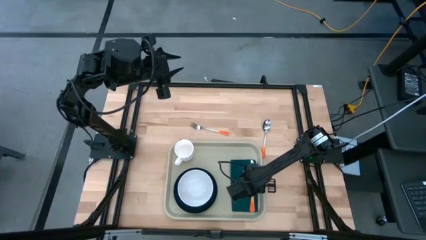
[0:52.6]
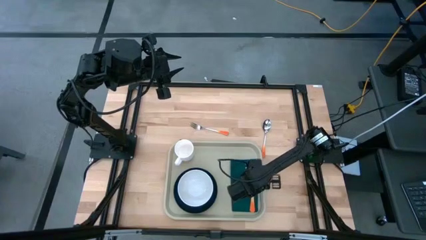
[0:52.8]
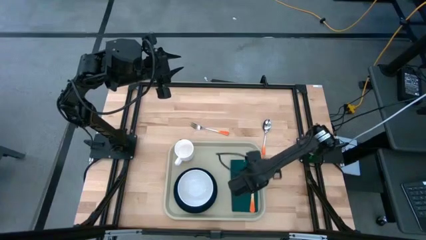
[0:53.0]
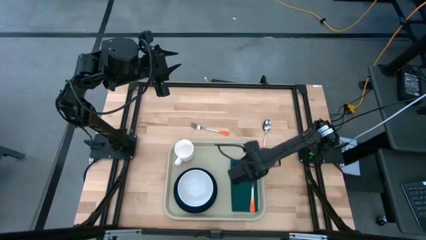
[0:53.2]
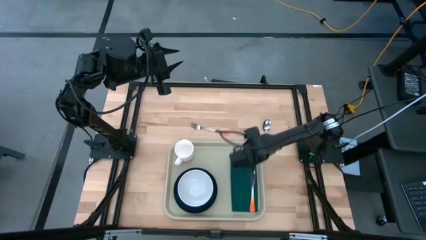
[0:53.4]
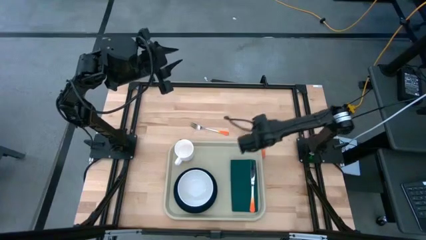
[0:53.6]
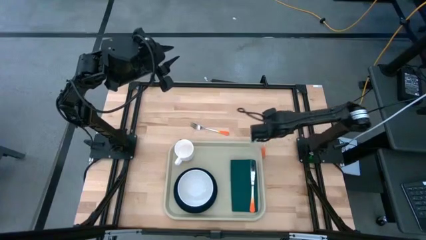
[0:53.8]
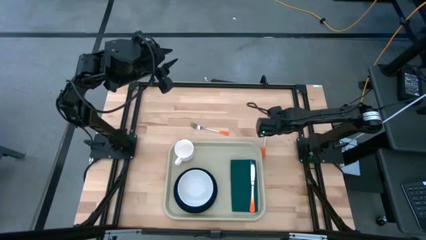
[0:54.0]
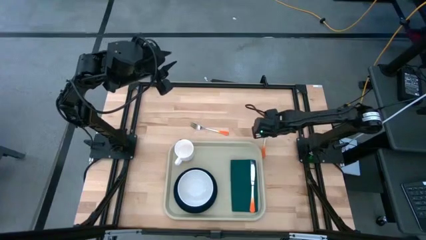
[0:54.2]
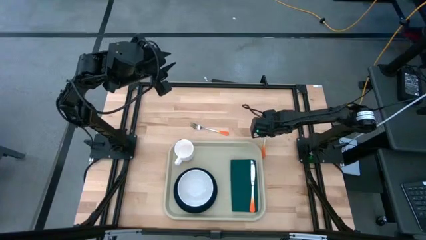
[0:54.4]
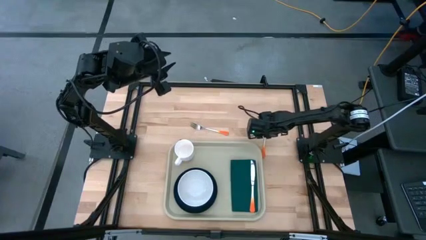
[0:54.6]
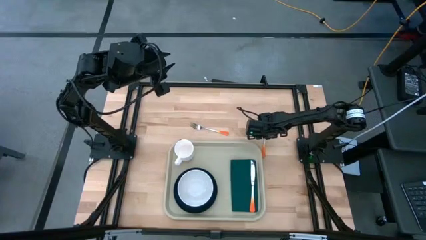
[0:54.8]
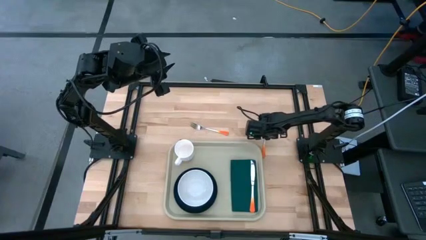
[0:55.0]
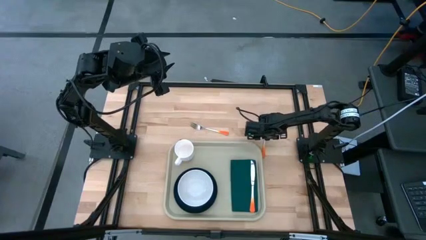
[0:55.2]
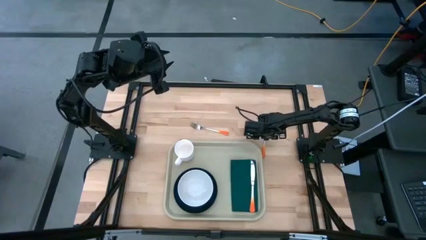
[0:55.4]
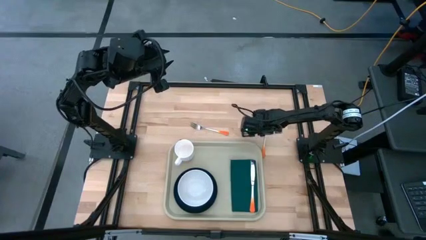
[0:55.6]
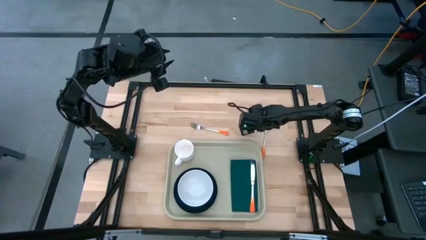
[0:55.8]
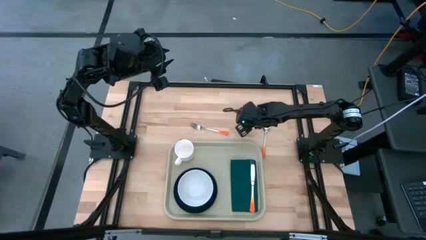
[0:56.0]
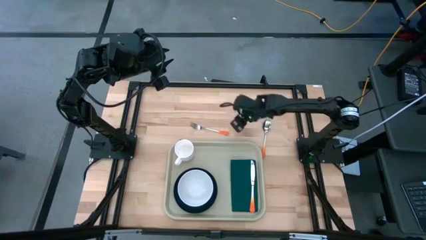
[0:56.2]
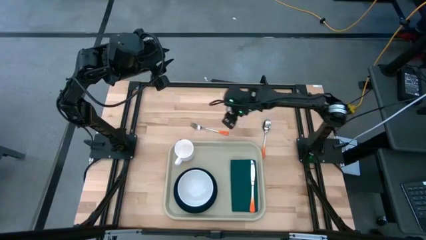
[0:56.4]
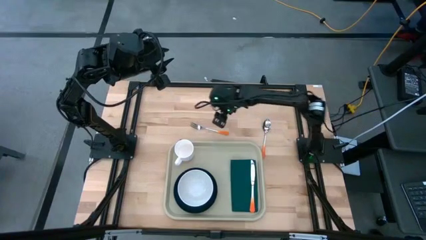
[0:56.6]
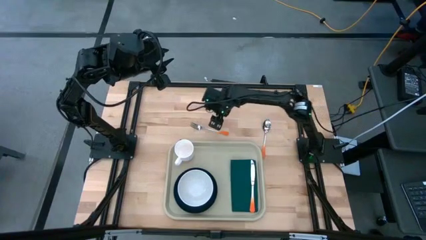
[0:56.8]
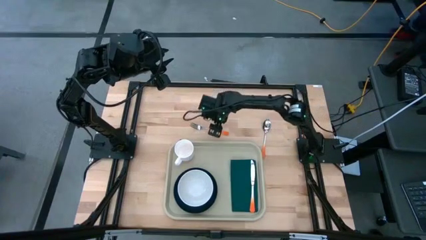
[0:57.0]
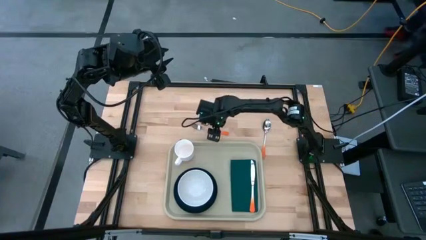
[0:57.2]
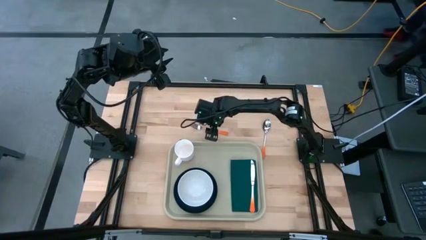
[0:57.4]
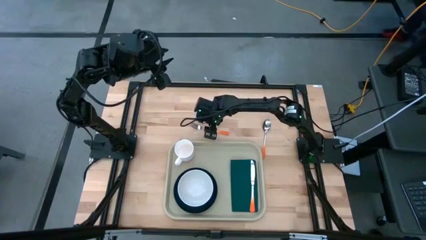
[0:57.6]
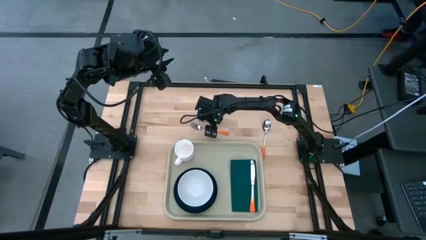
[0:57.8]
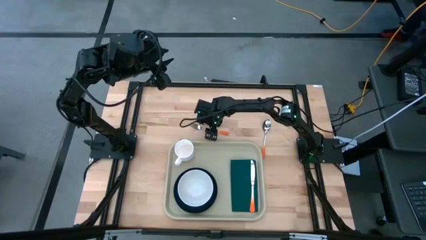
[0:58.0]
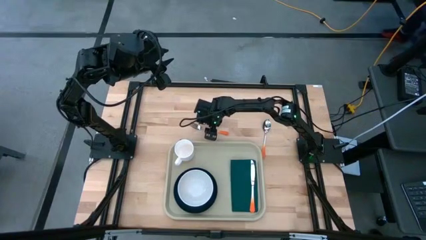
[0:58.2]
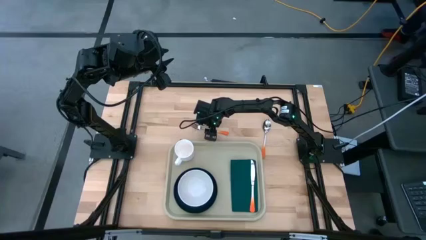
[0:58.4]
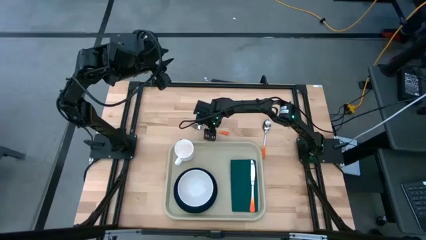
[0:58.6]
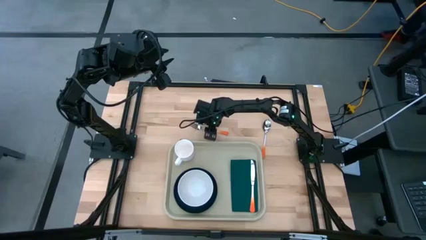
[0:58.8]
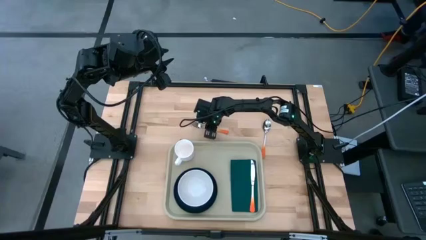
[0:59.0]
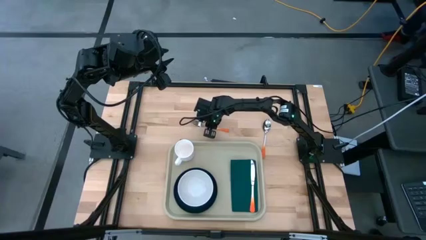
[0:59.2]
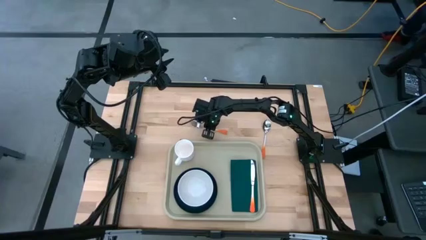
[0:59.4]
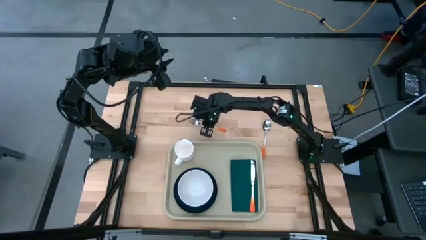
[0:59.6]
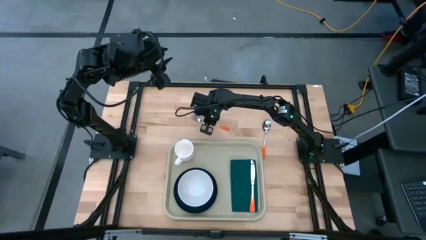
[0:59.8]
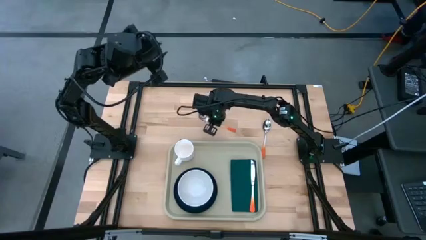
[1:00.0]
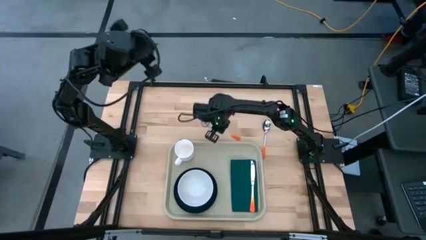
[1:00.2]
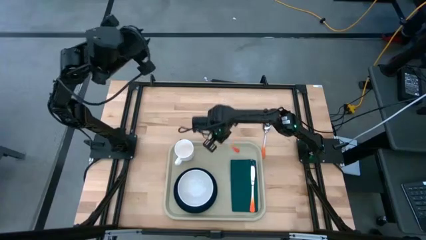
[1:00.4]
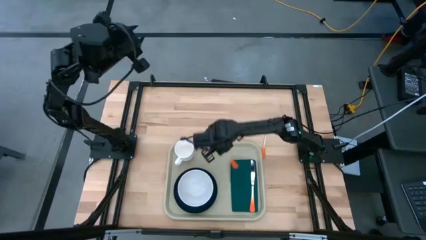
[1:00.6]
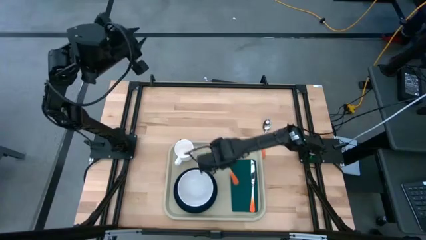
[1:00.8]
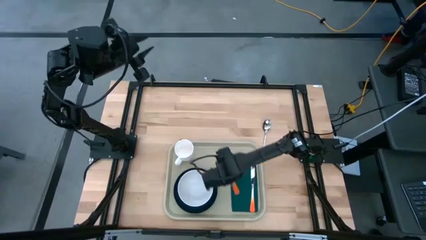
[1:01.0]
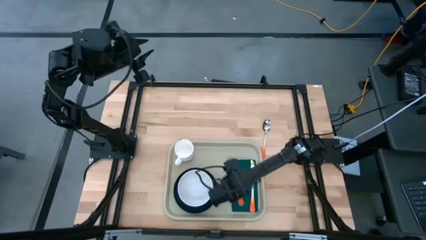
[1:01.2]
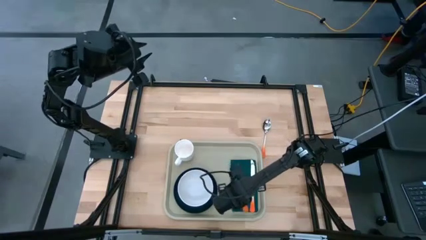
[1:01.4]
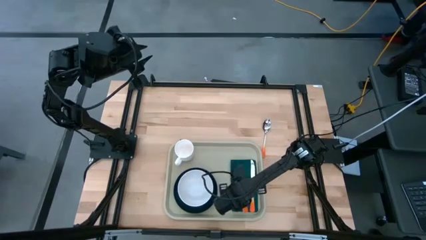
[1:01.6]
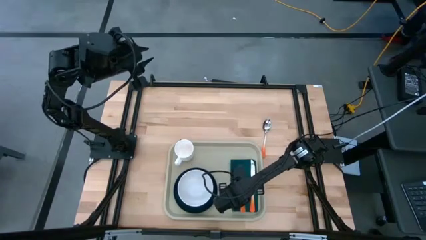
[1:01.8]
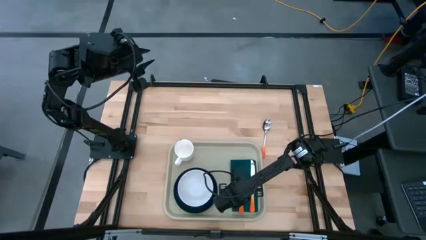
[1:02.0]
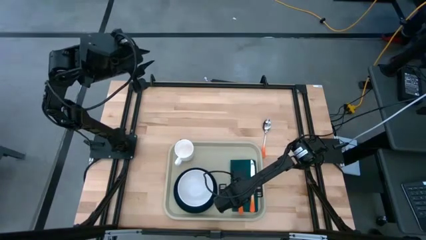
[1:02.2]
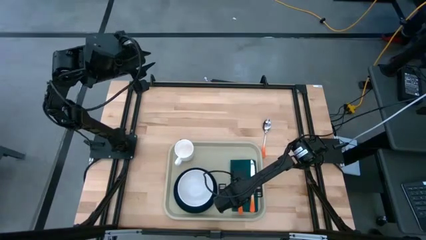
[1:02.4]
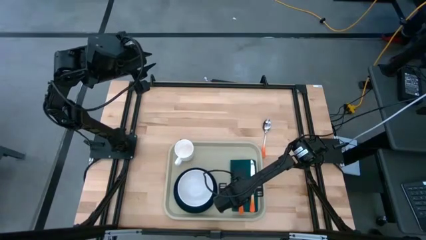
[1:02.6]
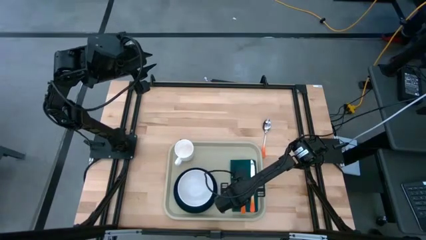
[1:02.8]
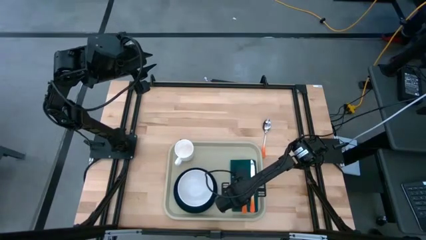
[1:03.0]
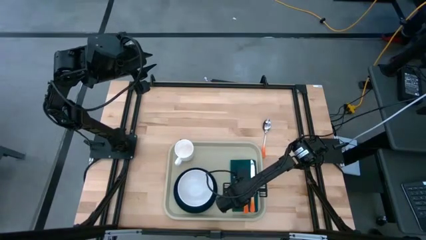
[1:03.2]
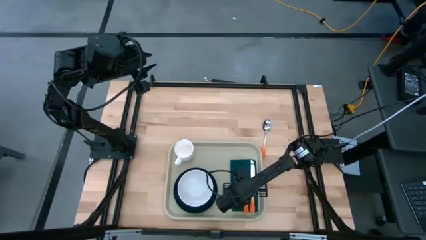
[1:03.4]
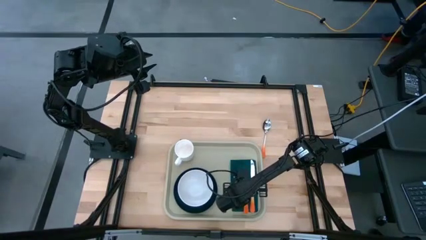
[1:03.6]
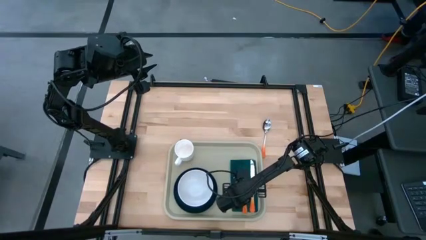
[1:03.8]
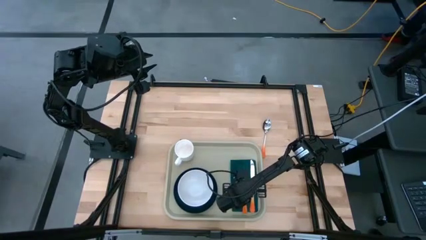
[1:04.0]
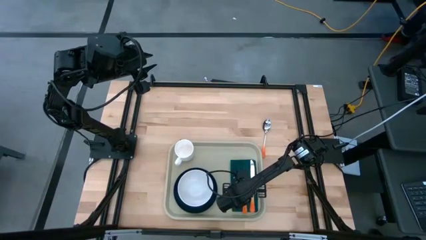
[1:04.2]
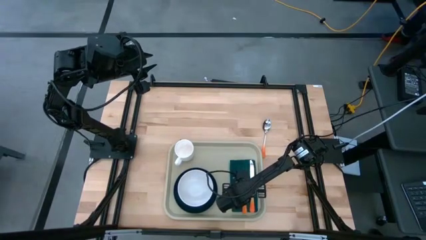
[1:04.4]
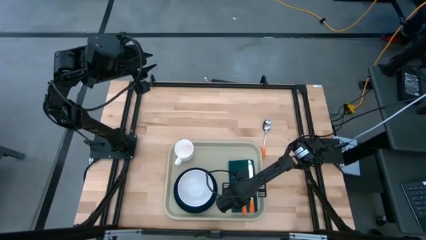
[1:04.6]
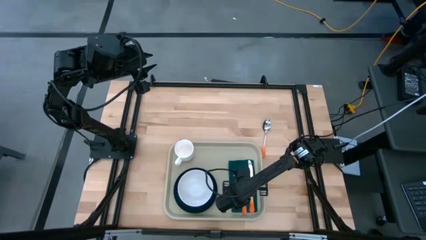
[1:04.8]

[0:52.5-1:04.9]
Task: Set up tray
Put the orange fork on top of the dark green napkin to the left of the orange knife
